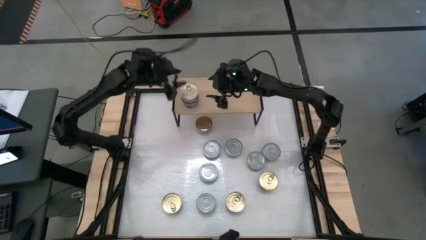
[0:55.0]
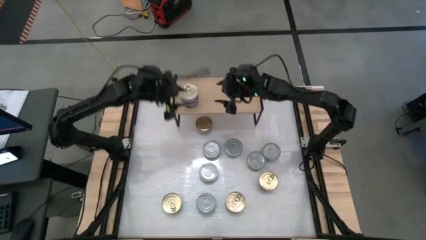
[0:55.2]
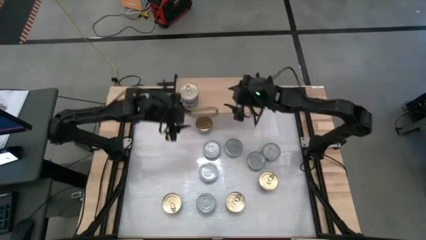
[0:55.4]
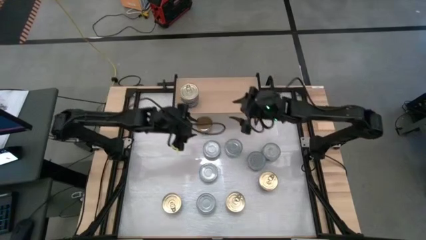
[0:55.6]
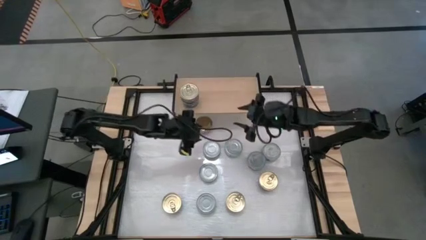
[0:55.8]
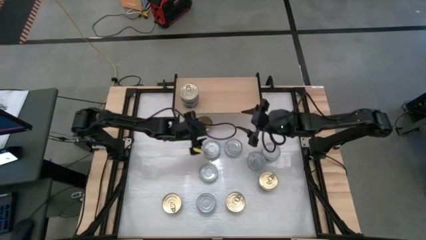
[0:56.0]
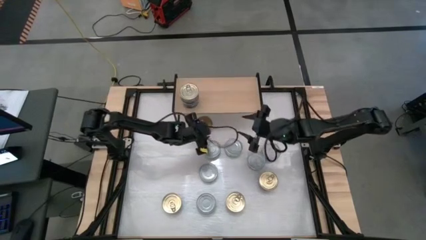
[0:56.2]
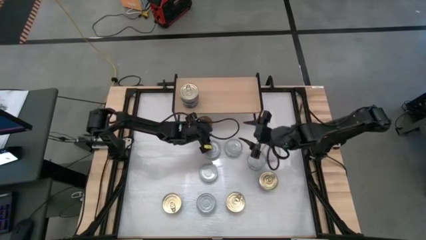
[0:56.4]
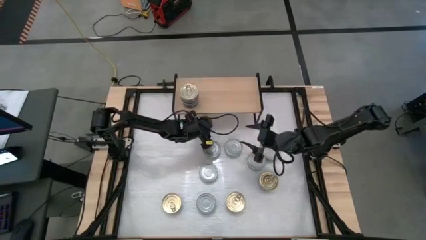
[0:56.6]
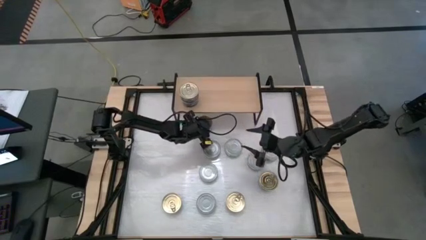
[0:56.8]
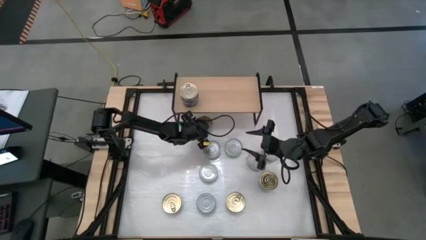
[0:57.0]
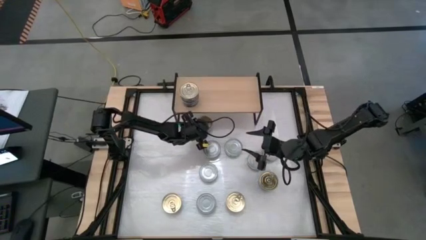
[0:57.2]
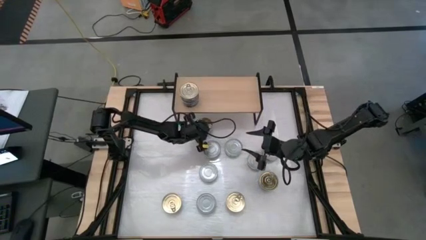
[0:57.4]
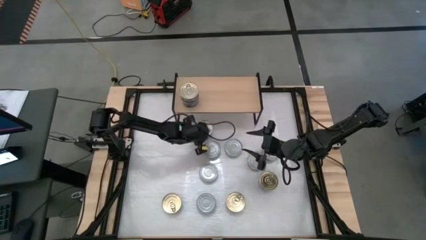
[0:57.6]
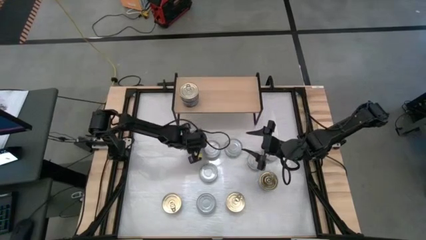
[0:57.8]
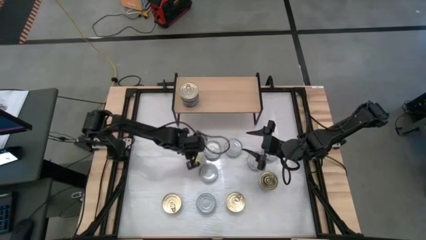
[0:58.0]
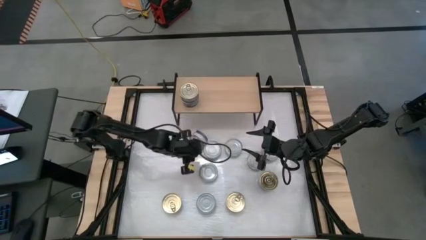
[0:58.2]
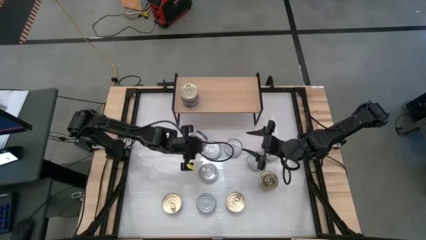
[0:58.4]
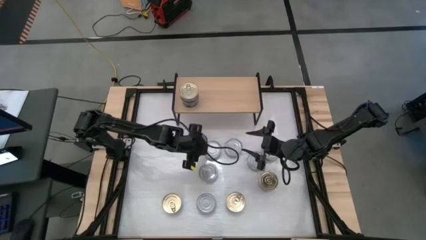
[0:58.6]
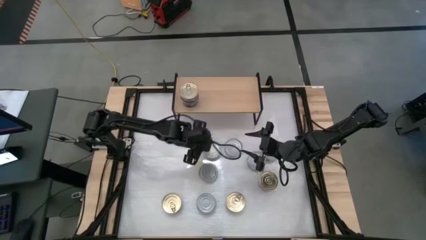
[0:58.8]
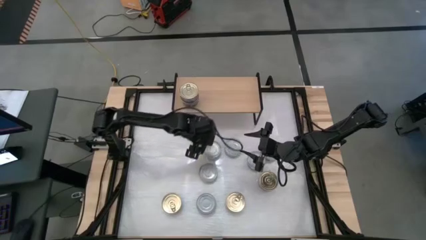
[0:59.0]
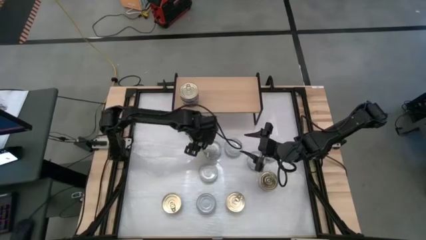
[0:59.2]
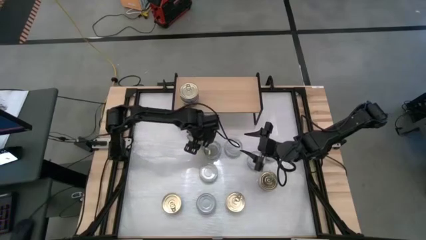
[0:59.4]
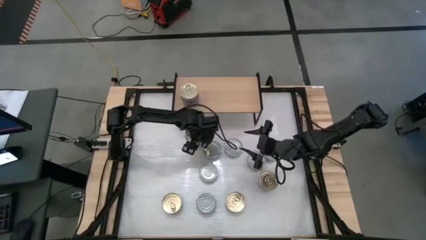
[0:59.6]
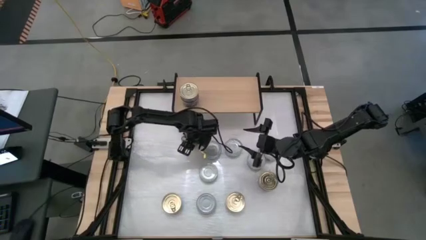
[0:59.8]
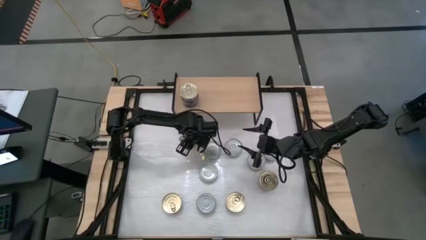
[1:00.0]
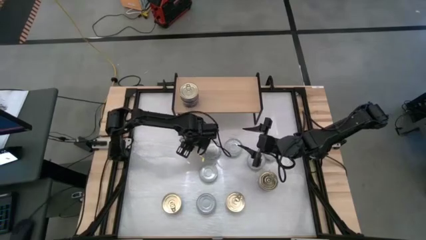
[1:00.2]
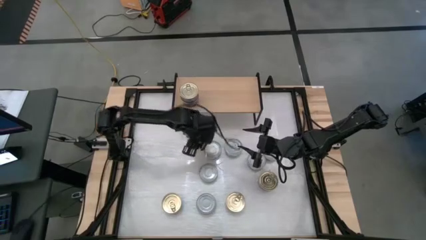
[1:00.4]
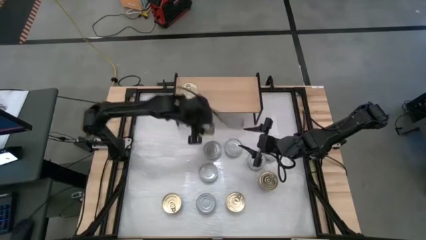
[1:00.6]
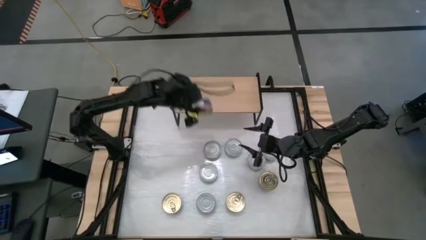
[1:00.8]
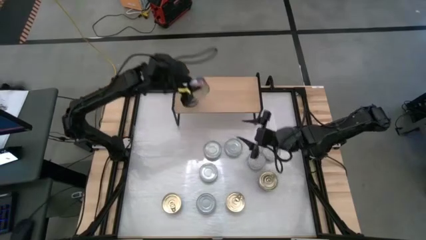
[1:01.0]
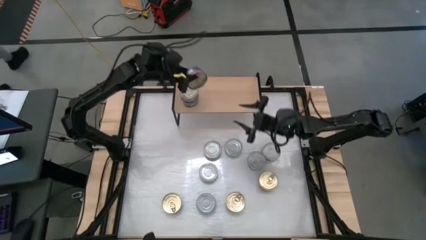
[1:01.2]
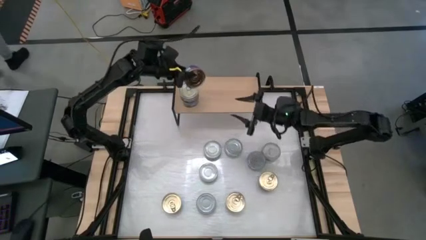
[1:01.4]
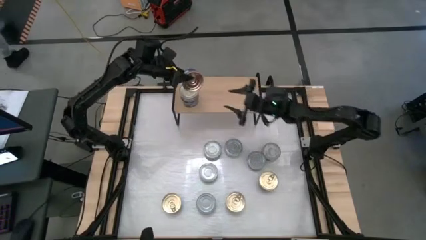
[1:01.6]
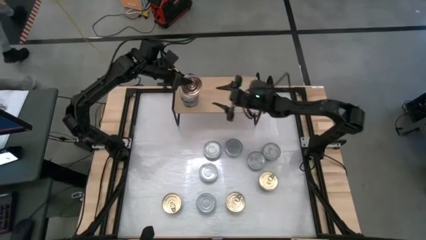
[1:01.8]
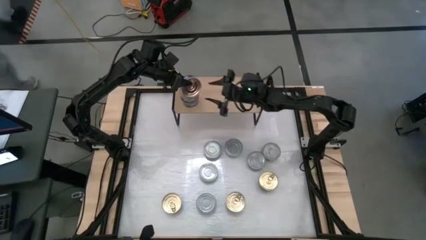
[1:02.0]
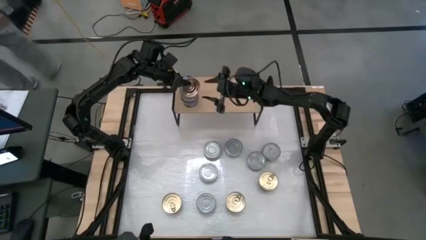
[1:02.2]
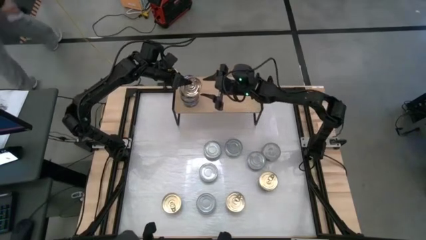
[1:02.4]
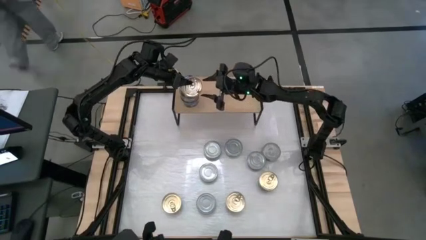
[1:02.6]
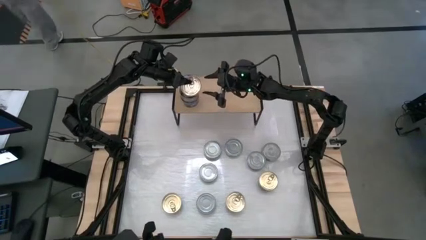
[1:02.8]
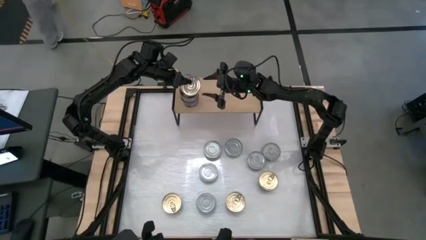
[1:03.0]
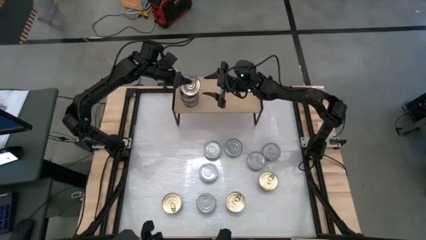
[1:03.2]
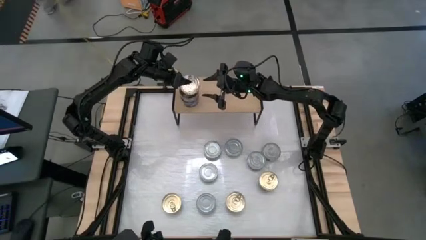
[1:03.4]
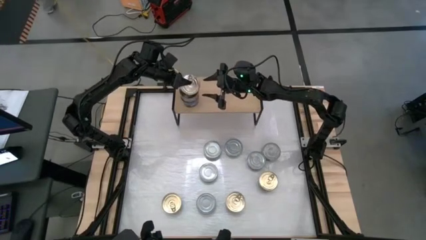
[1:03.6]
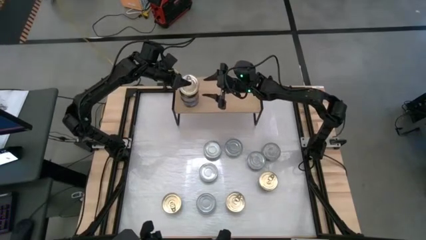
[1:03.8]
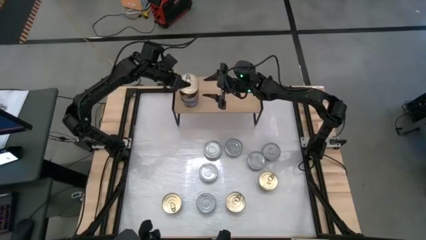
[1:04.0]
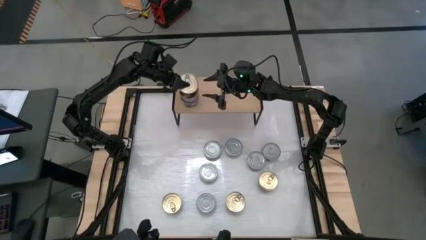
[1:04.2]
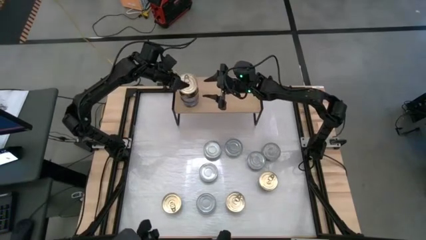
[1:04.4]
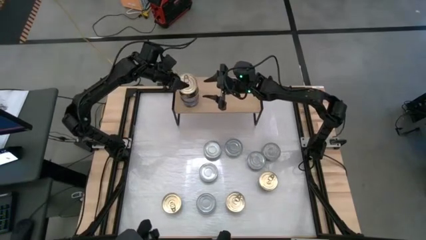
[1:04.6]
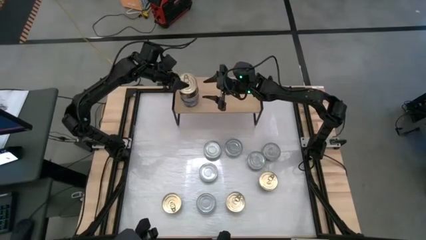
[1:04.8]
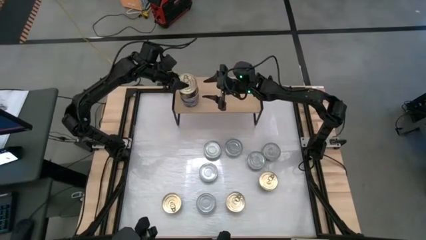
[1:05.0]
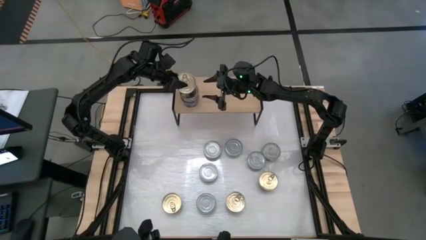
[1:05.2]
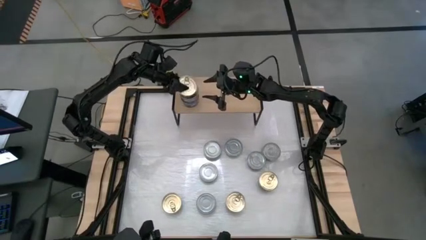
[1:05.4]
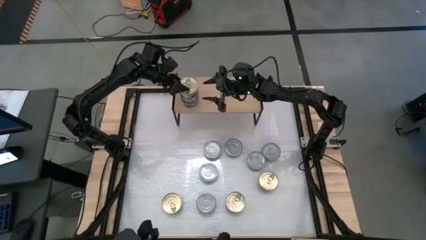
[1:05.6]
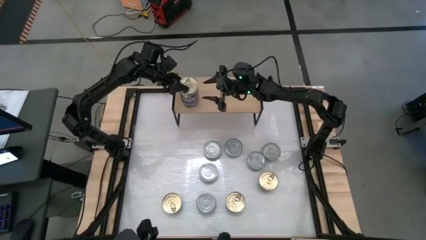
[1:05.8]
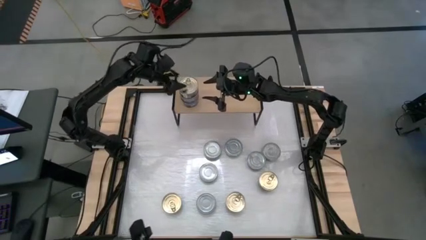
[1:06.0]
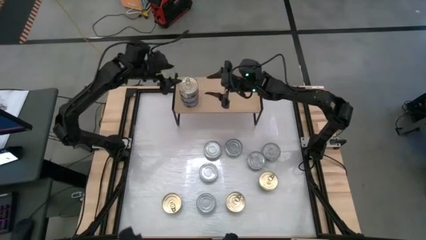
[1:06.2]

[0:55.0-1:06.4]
Task: Stack canned seafood by type on shelf
Stack the blue tuna can on top of the other blue tuna cans on the shelf

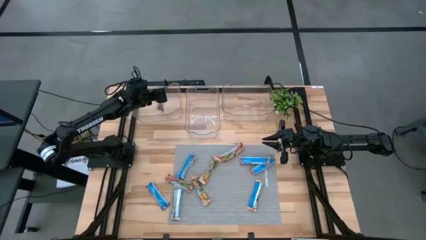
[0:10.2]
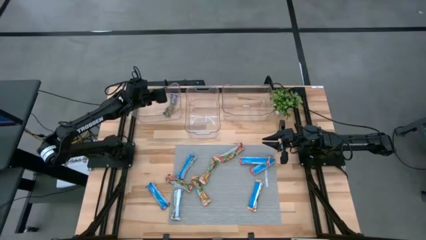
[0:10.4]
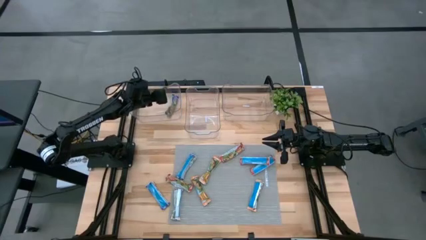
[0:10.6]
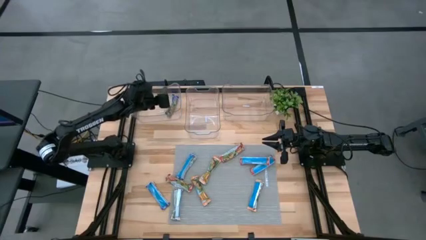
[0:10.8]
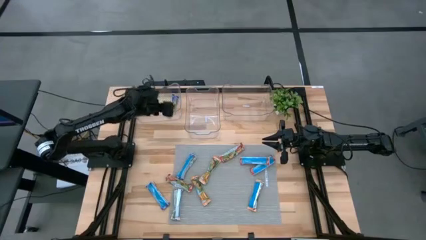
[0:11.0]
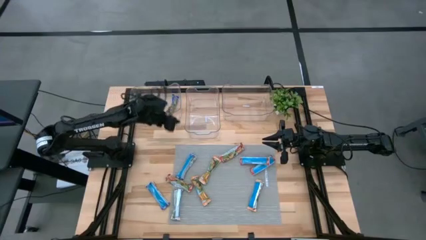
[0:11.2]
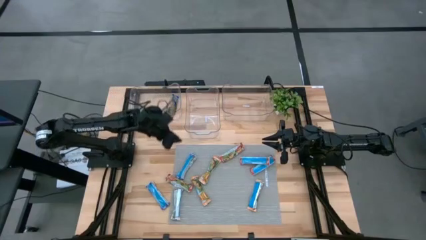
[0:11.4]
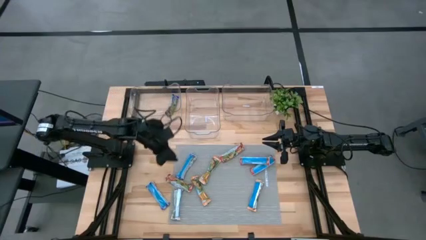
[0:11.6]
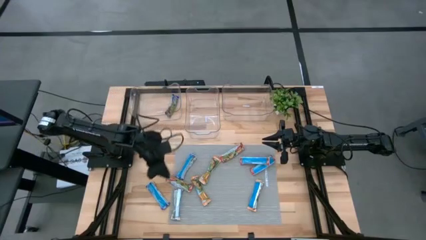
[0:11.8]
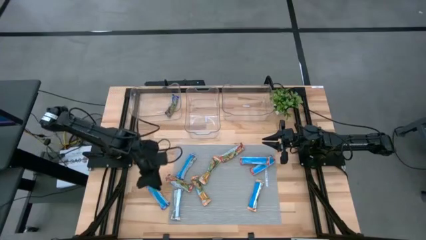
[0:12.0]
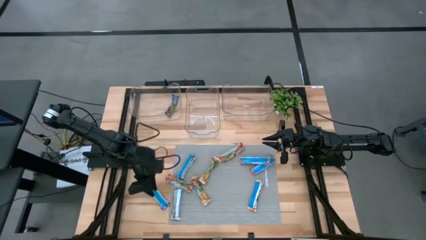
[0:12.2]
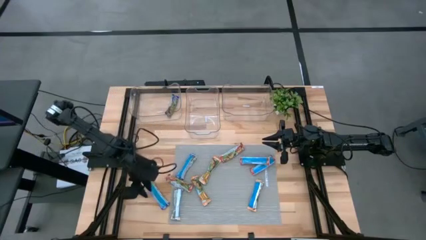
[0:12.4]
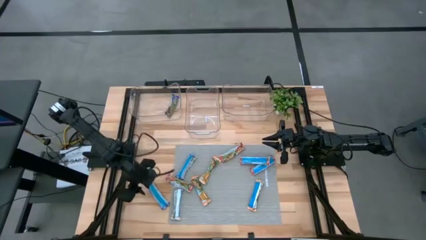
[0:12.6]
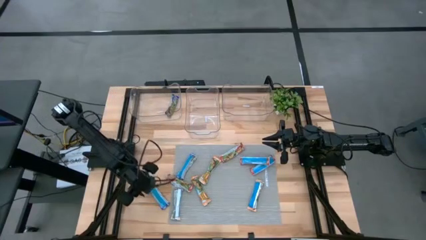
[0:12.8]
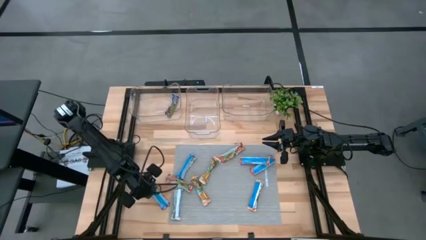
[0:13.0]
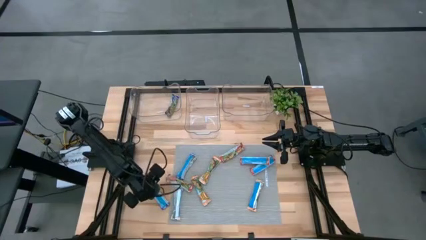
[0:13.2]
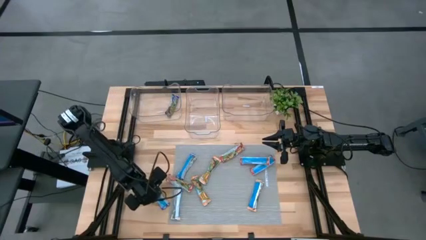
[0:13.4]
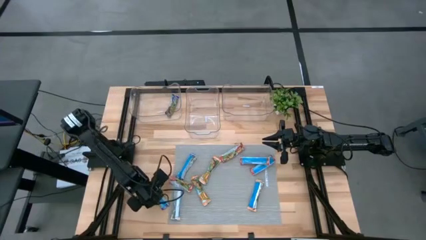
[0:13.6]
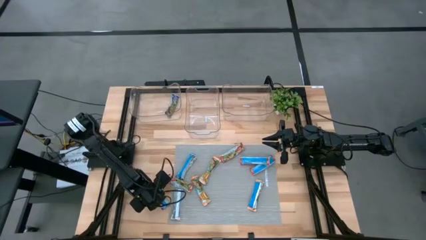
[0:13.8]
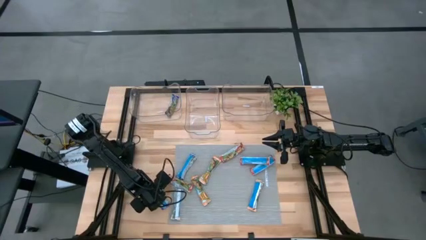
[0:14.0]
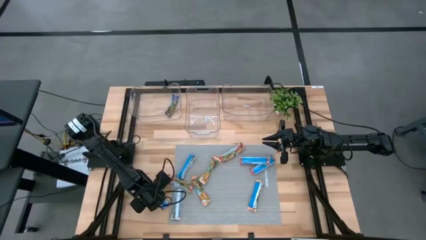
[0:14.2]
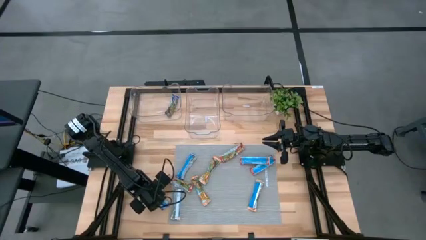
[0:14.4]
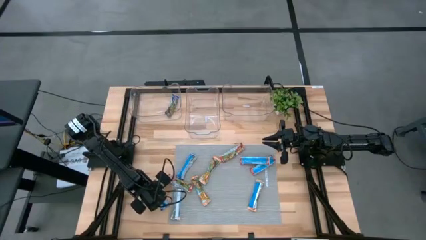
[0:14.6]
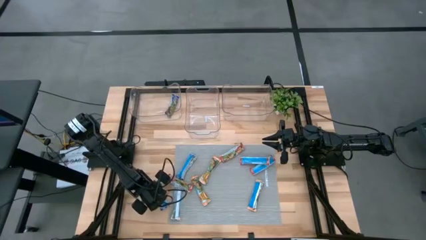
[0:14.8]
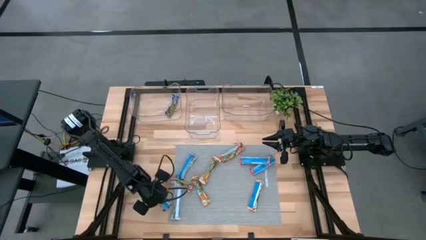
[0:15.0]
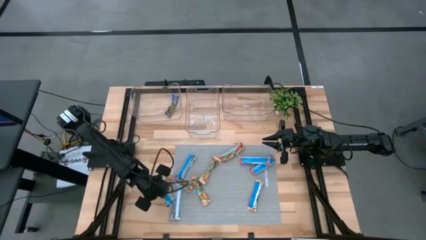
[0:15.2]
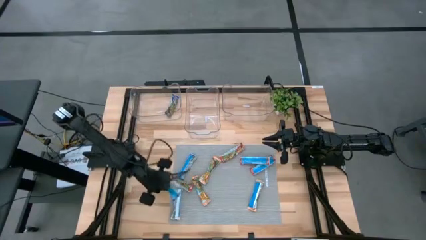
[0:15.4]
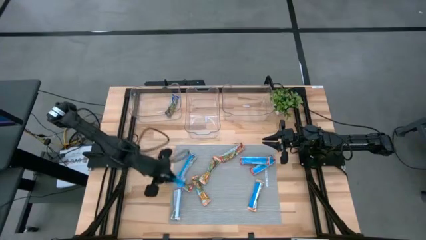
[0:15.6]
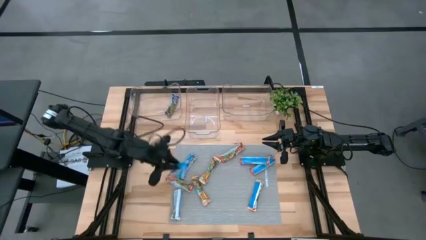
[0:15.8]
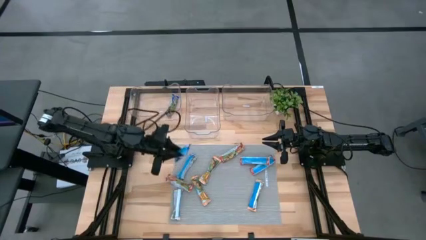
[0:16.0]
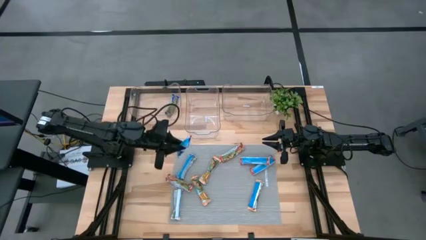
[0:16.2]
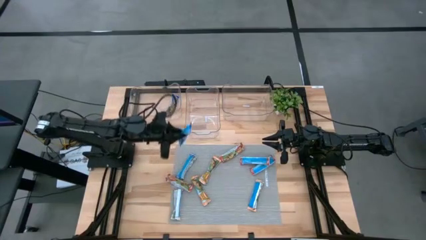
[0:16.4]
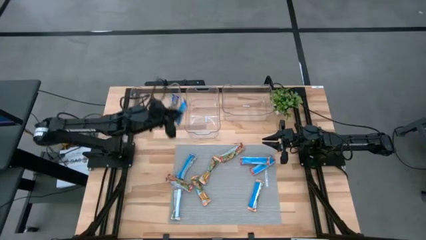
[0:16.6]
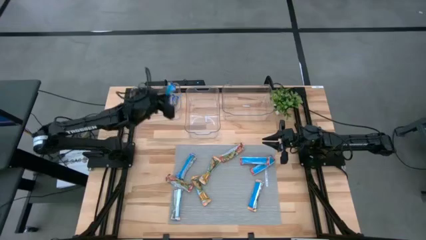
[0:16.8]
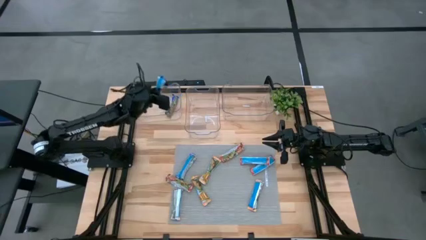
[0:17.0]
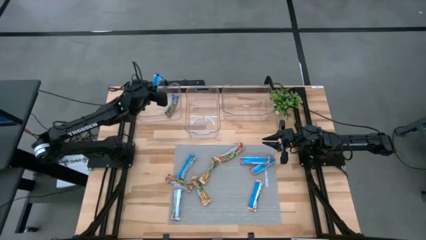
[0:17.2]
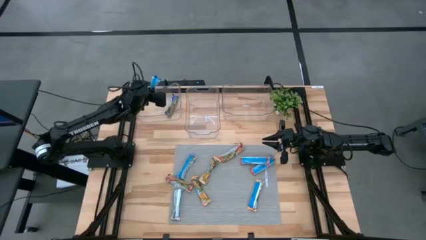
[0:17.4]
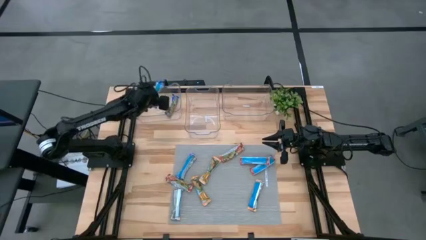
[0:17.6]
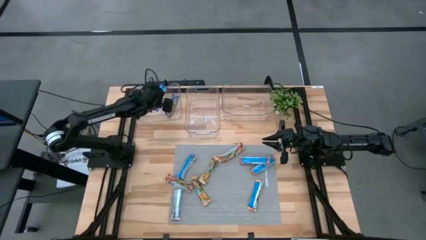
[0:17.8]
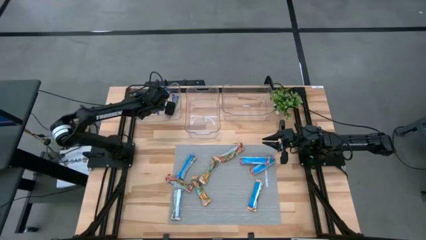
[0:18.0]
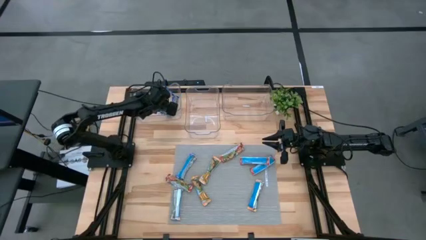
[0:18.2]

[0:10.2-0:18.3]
Task: Pick and place Granola Bars by type
Put the blue granola bar into the left transparent bin
